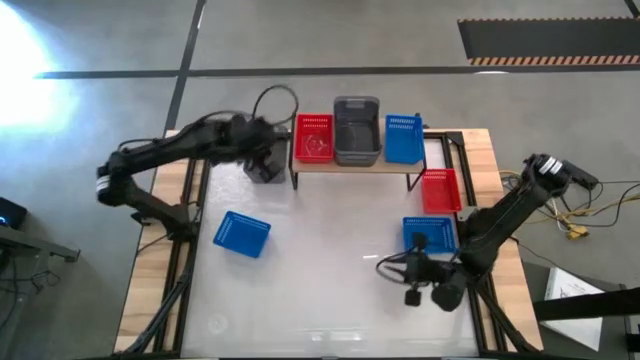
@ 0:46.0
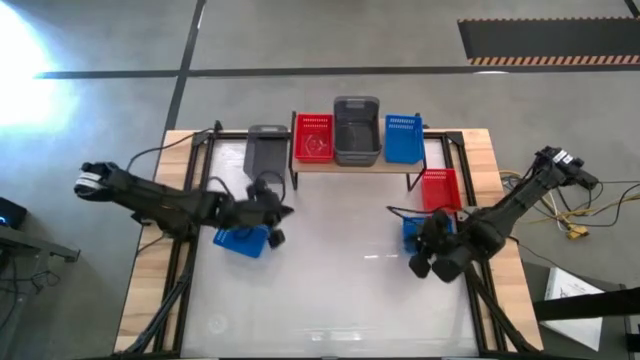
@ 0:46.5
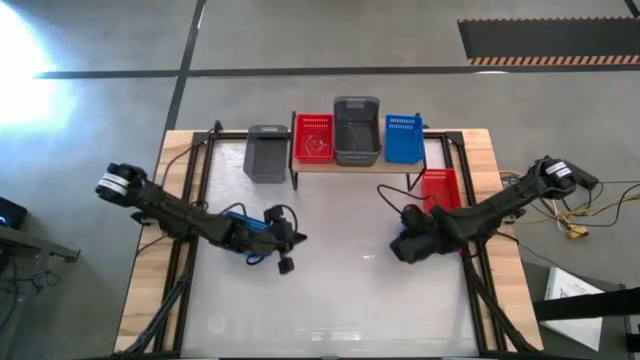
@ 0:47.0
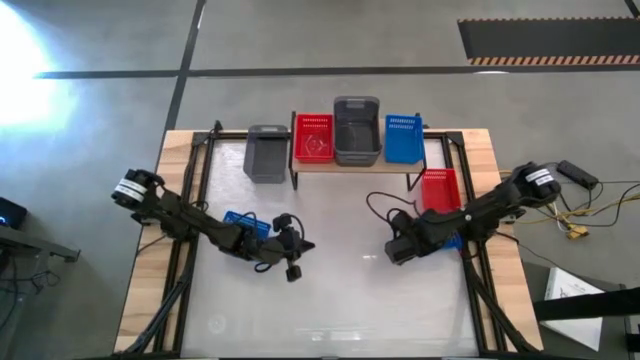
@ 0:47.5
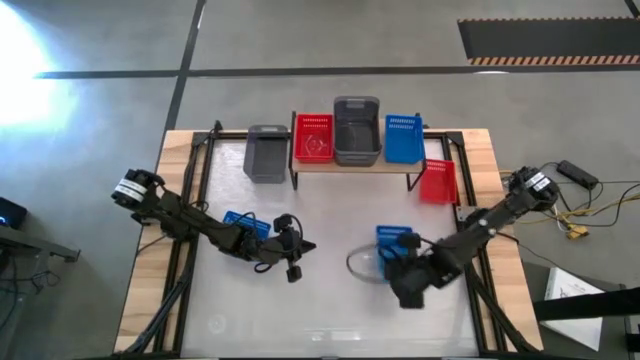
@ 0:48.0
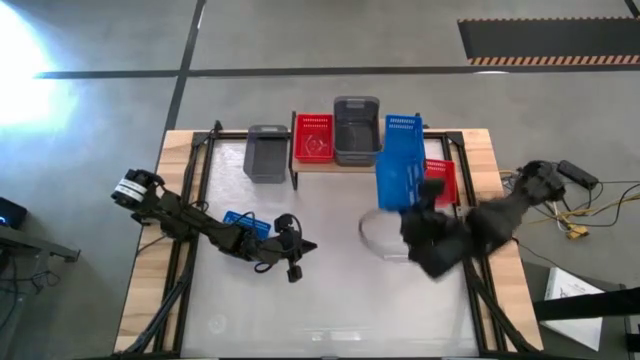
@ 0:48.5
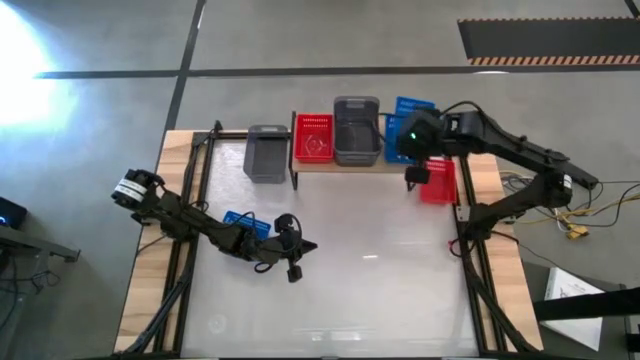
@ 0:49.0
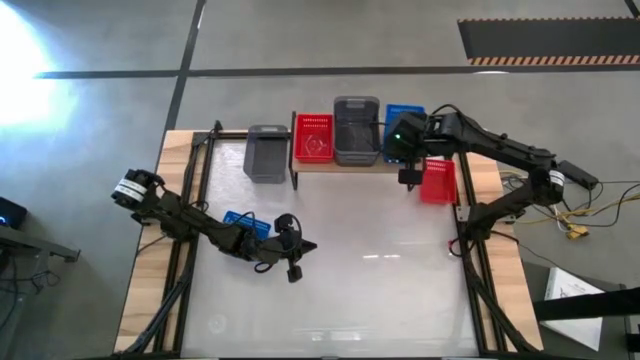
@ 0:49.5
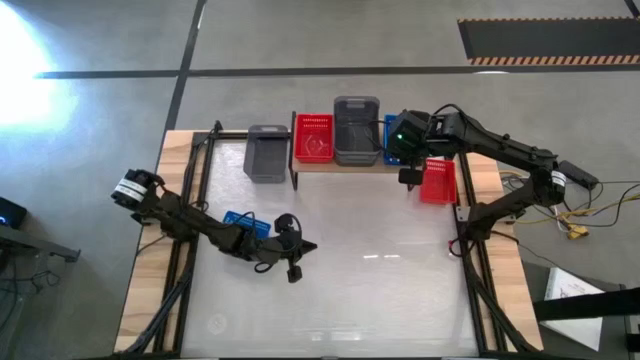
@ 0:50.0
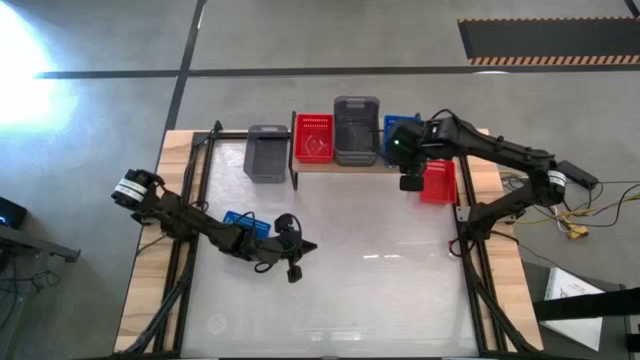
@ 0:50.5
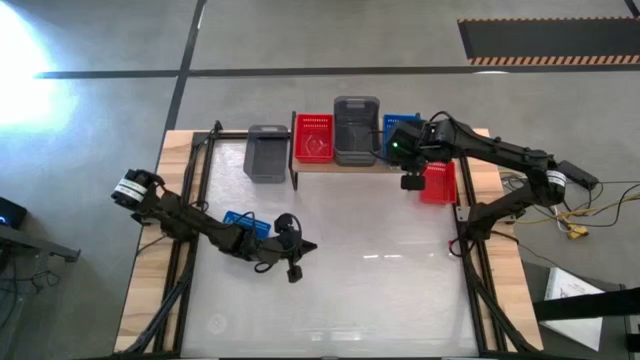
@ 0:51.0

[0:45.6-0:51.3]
Task: Stack baskets on shelf by color
Stack the right blue bin into the blue bin on the shelf

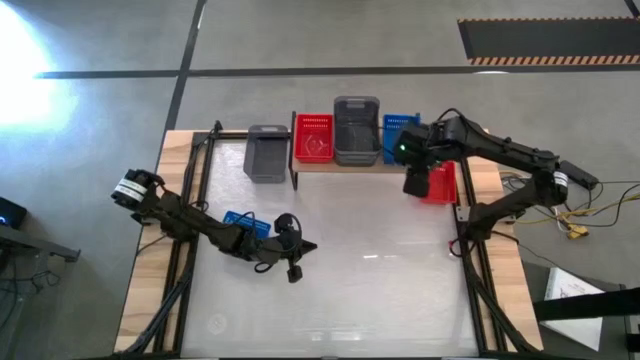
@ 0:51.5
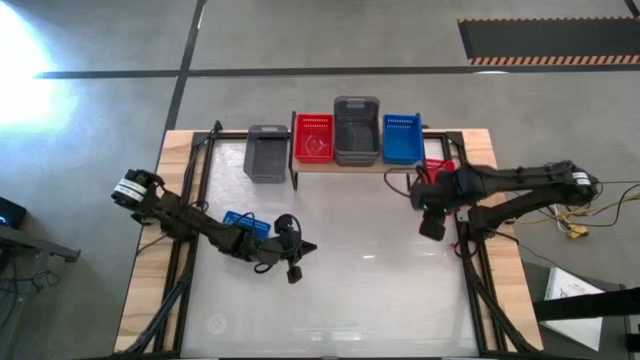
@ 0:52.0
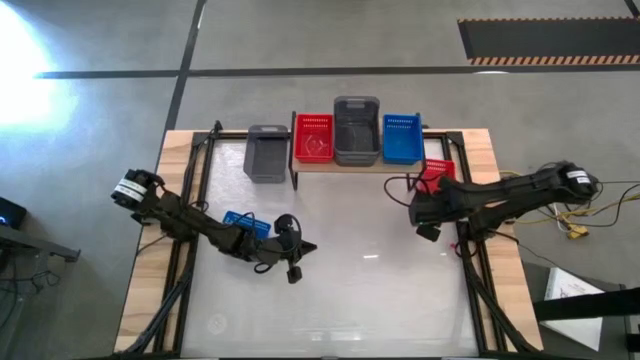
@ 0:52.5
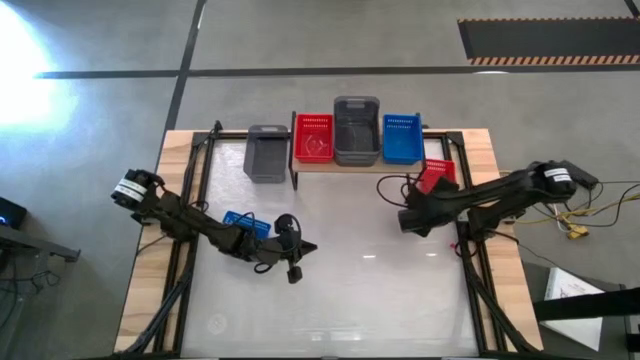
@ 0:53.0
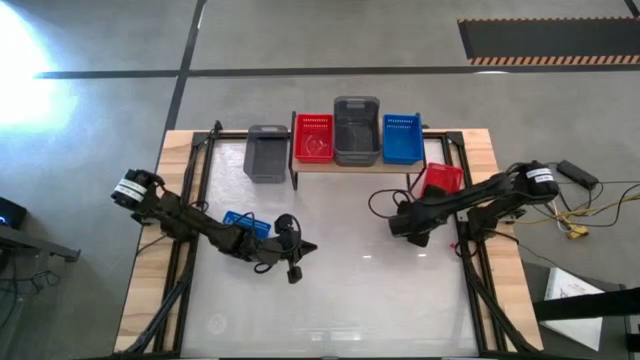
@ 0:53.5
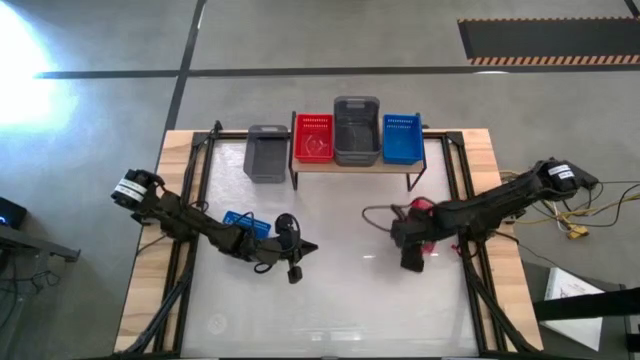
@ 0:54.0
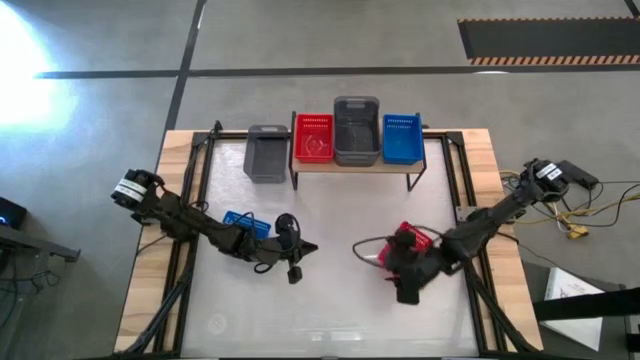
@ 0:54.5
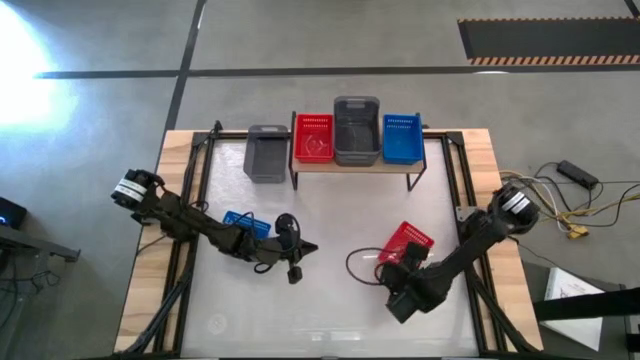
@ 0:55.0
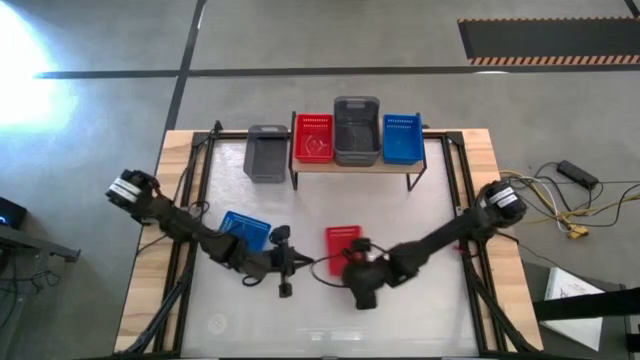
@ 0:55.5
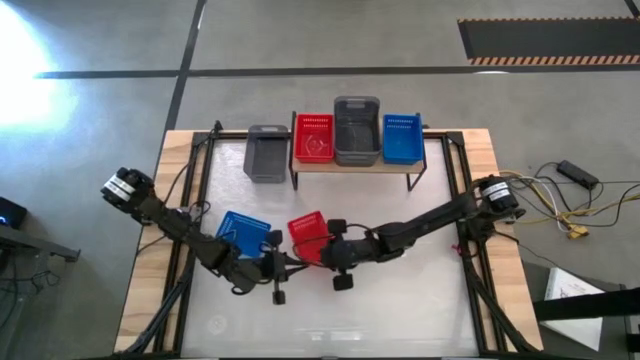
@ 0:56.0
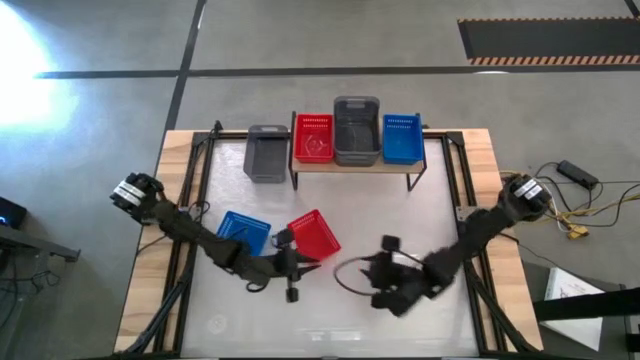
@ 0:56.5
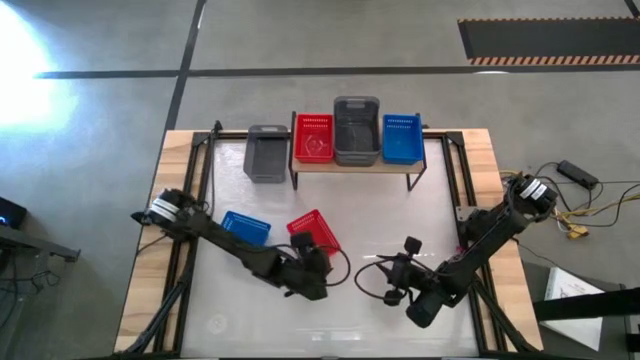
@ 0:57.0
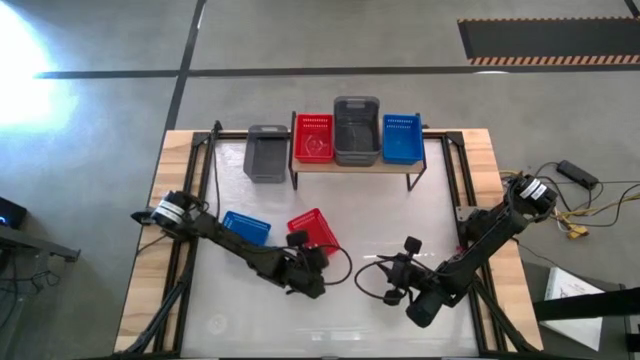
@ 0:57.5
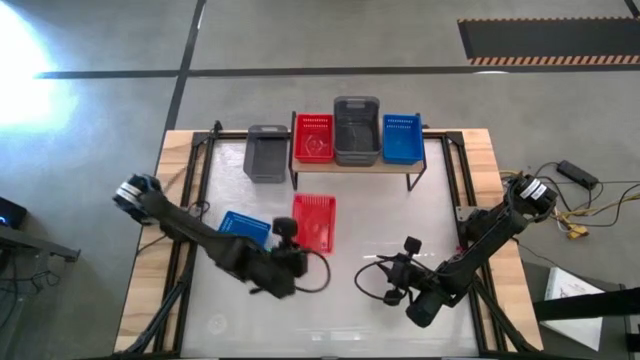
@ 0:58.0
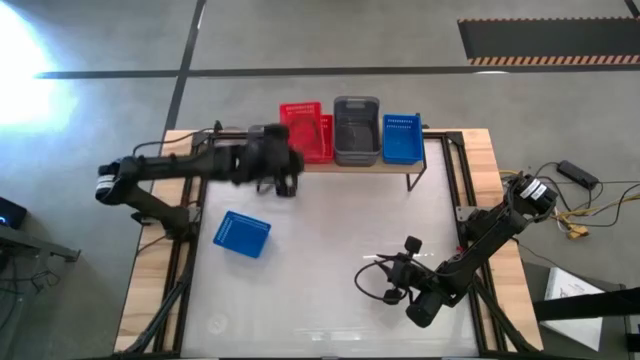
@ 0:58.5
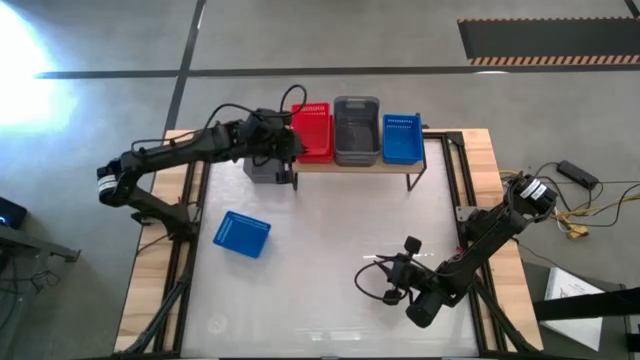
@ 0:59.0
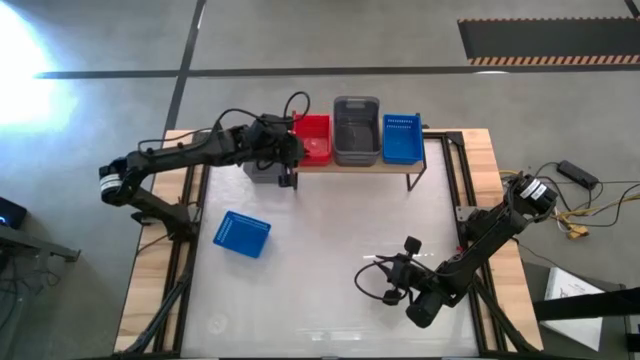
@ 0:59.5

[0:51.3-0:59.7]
Stack the red bin into the red bin on the shelf

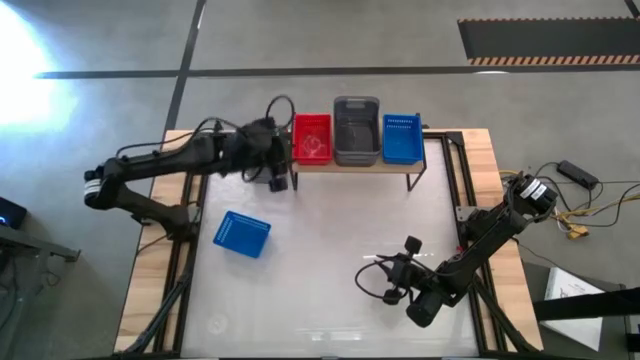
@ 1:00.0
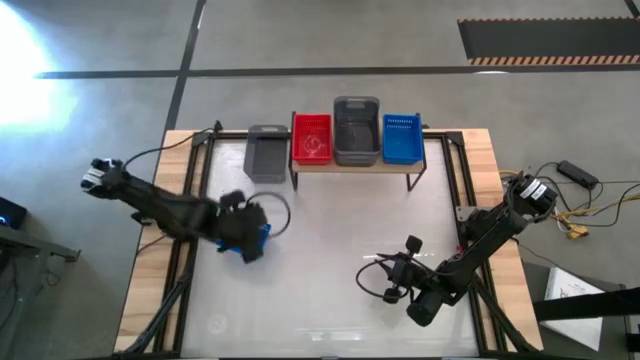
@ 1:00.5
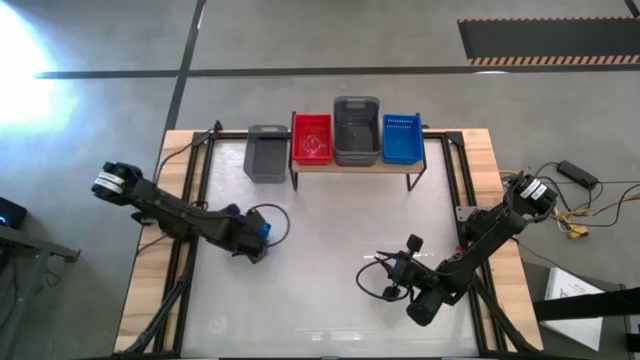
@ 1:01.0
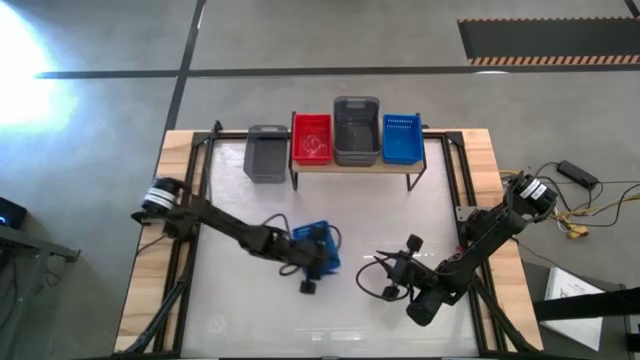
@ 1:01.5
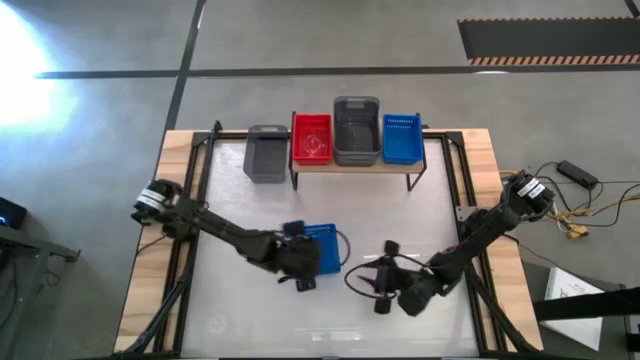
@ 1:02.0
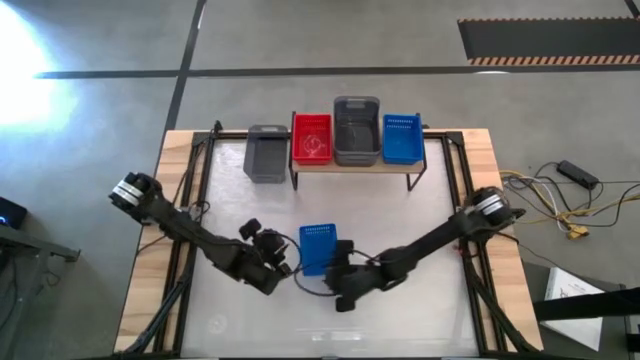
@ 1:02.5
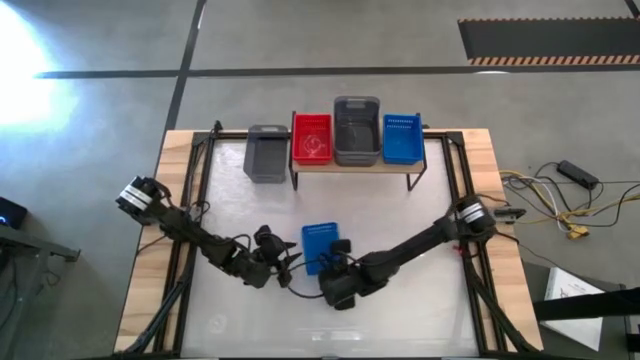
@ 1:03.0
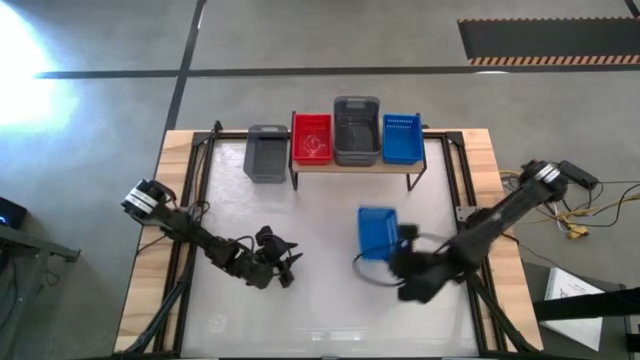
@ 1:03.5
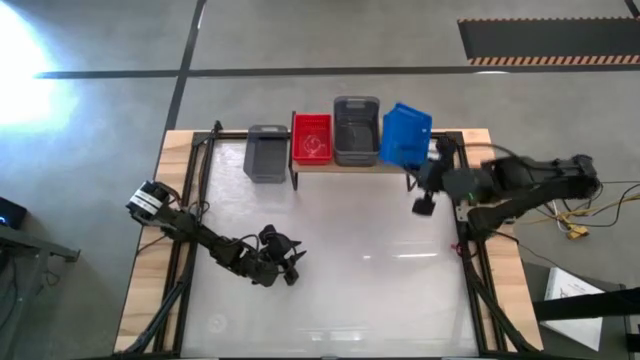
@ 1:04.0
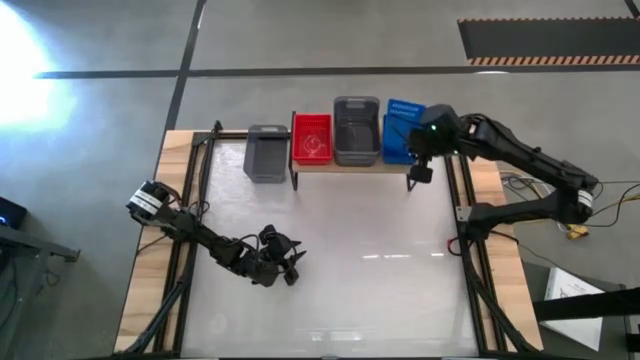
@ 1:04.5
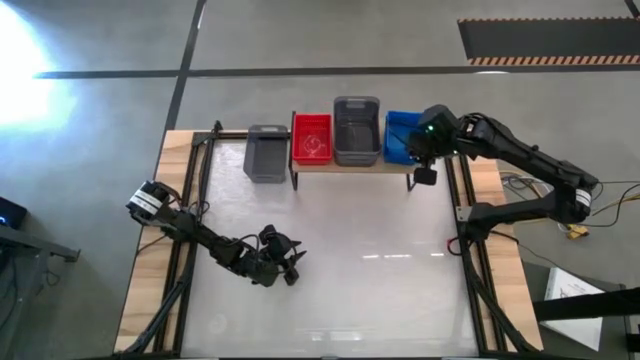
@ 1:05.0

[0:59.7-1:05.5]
Stack the blue bin into the blue bin on the shelf

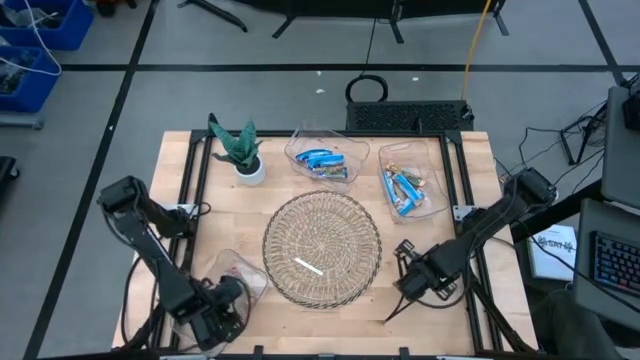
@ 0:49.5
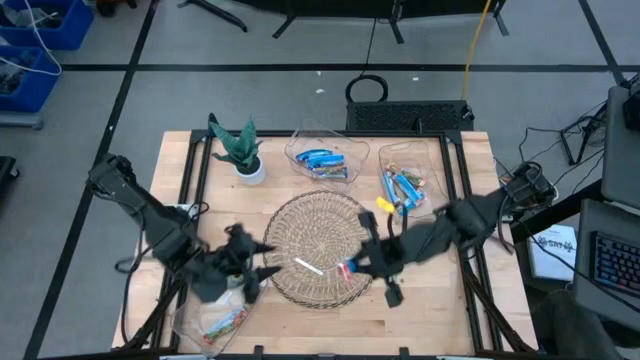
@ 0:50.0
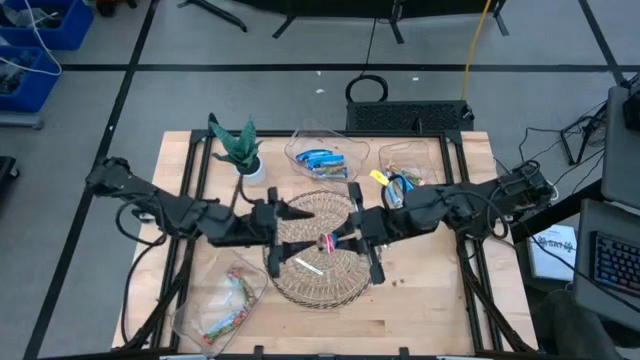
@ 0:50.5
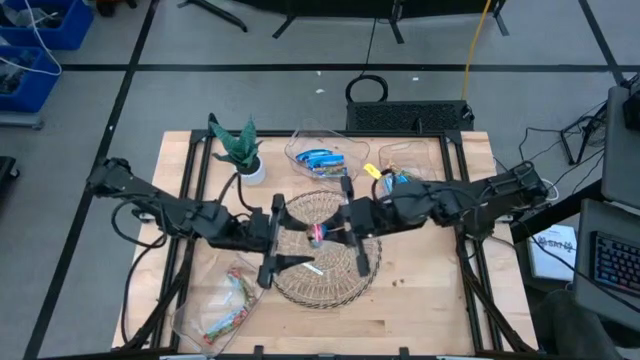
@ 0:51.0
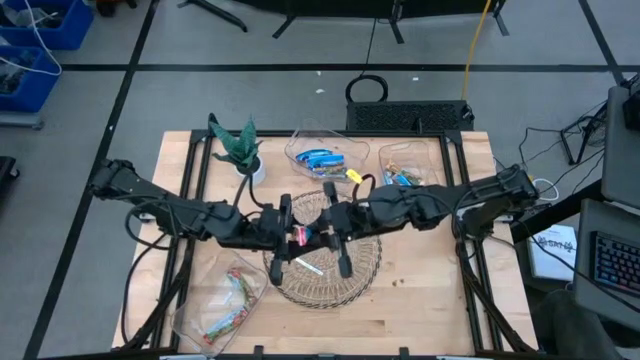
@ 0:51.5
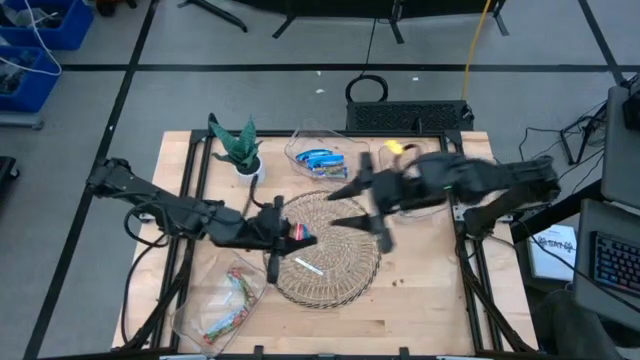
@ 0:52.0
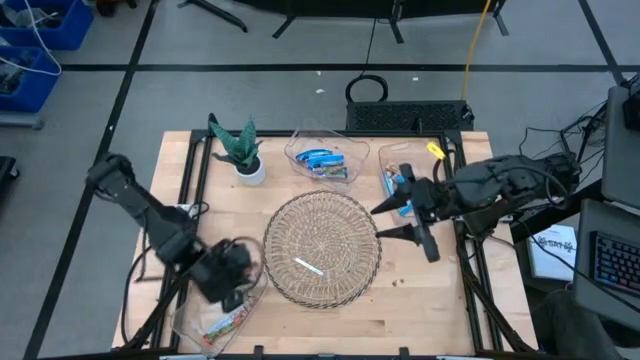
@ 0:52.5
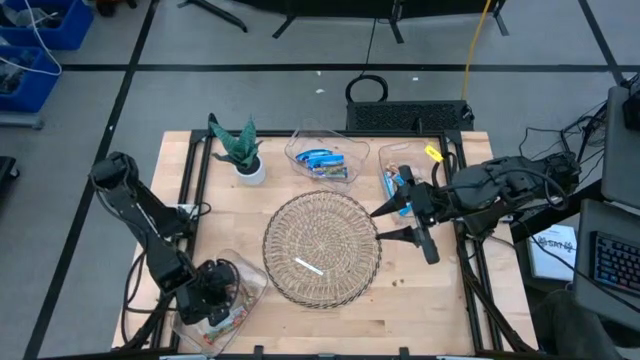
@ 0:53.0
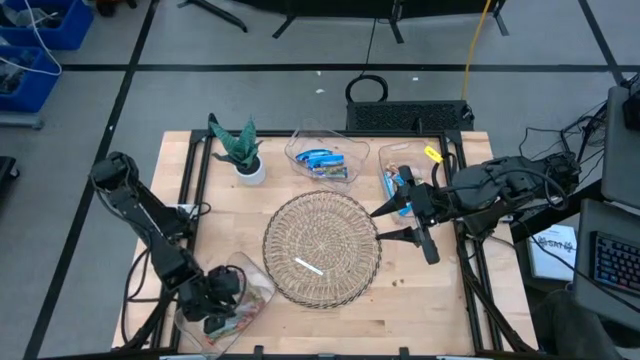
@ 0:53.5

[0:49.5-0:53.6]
Task: Pick and place Granola Bars by type
Put the red granola bar into the bottom transparent bin
